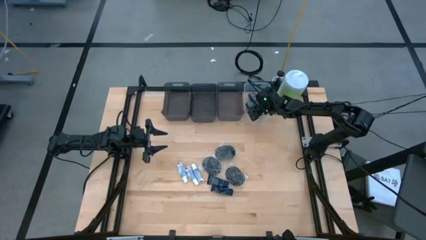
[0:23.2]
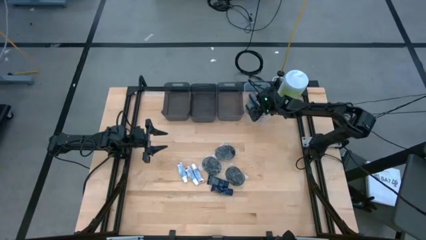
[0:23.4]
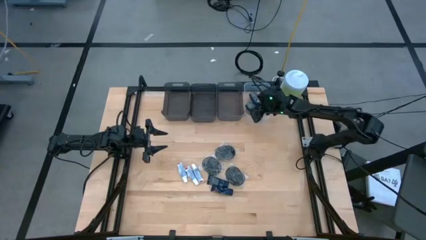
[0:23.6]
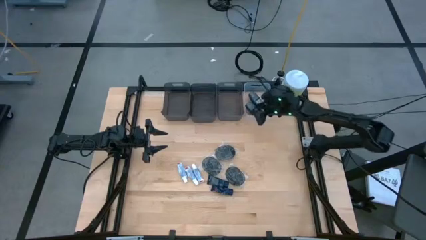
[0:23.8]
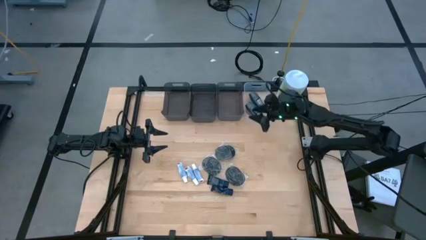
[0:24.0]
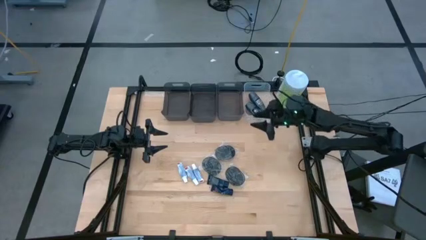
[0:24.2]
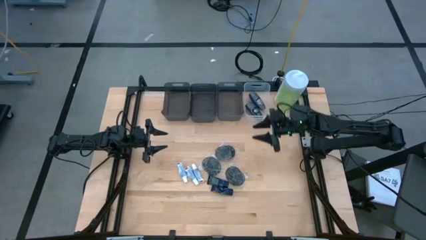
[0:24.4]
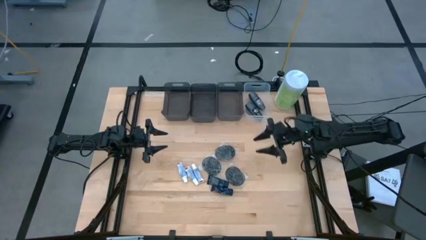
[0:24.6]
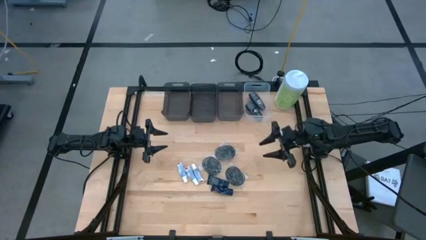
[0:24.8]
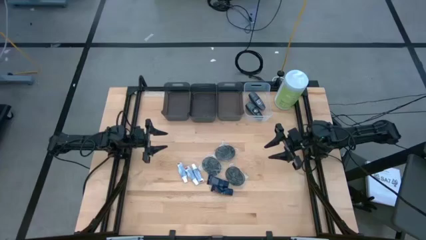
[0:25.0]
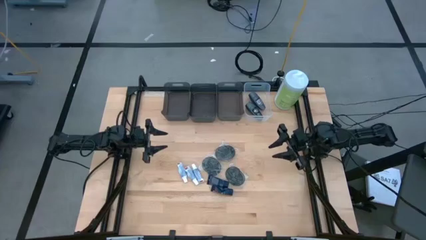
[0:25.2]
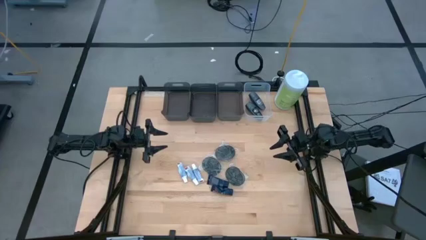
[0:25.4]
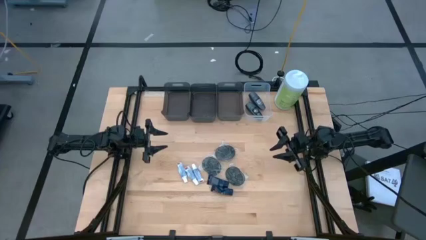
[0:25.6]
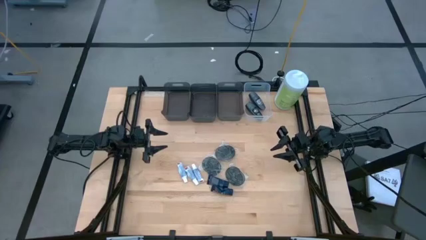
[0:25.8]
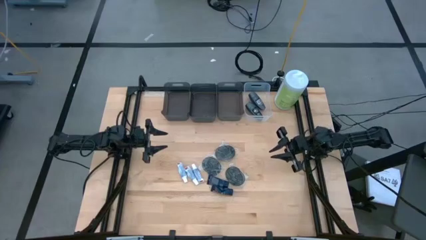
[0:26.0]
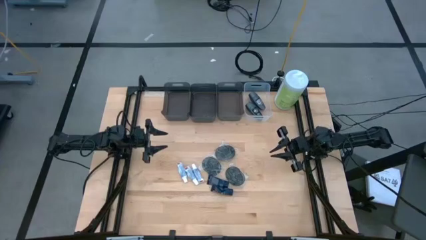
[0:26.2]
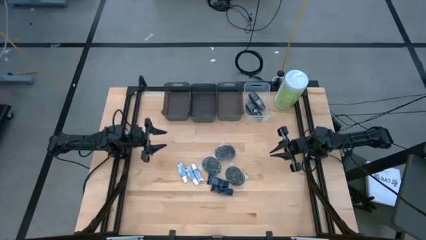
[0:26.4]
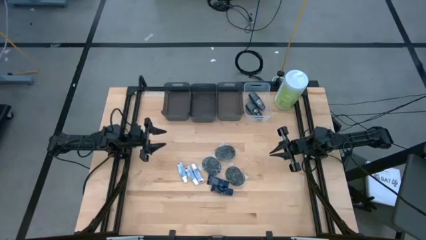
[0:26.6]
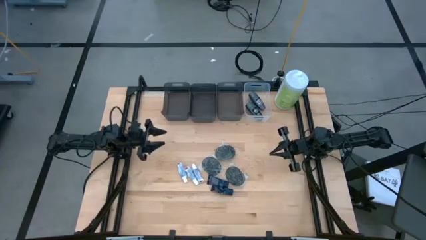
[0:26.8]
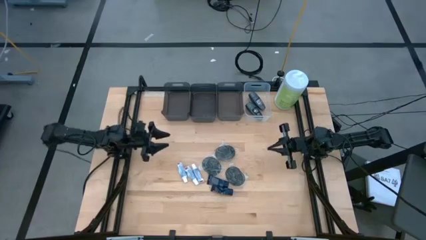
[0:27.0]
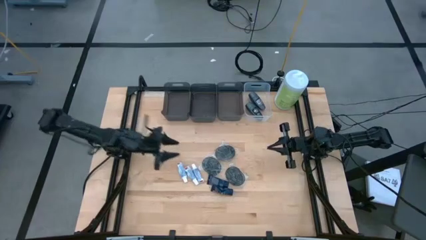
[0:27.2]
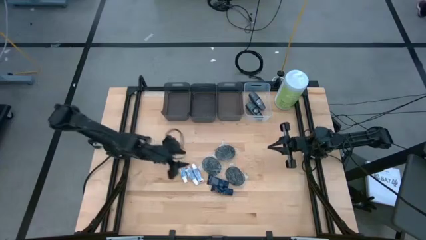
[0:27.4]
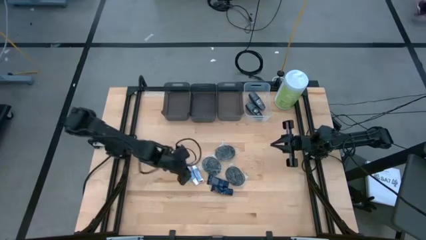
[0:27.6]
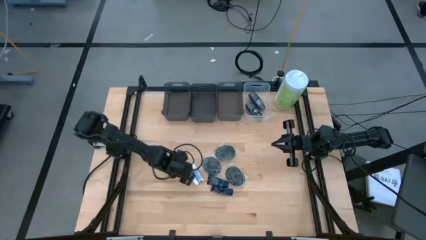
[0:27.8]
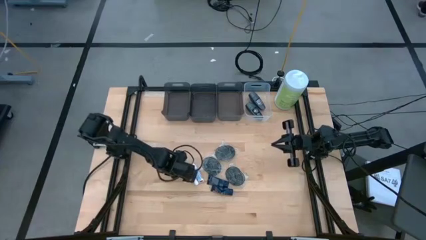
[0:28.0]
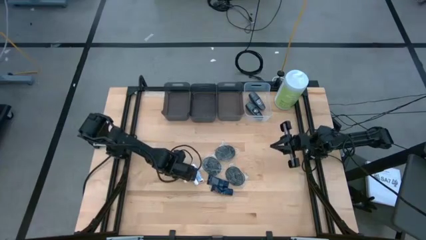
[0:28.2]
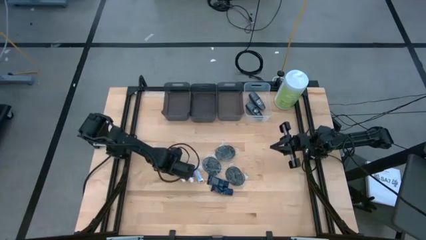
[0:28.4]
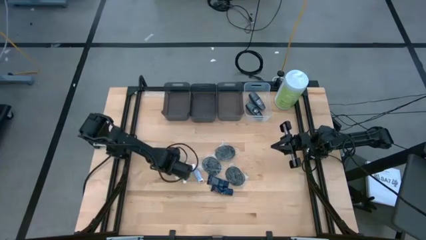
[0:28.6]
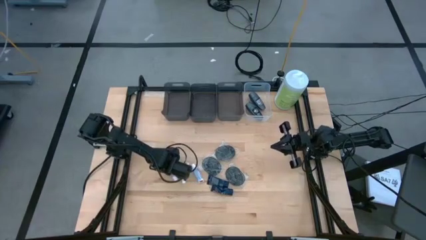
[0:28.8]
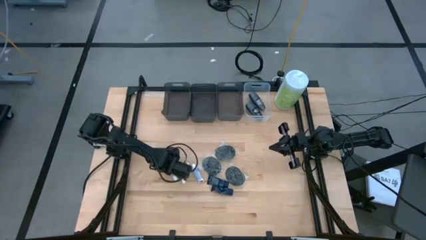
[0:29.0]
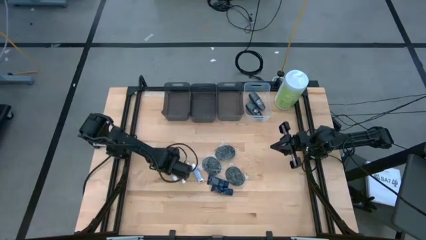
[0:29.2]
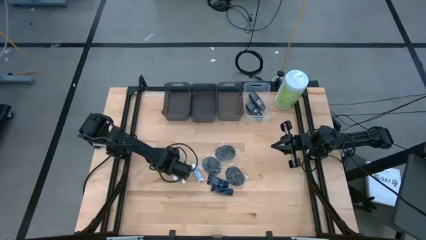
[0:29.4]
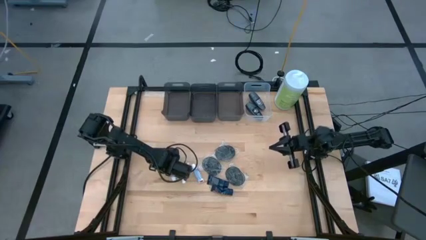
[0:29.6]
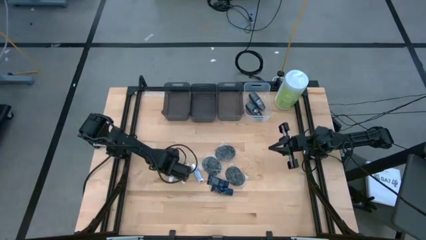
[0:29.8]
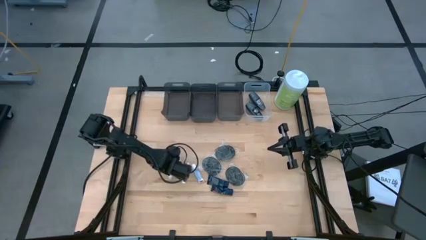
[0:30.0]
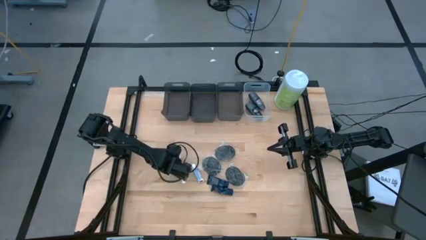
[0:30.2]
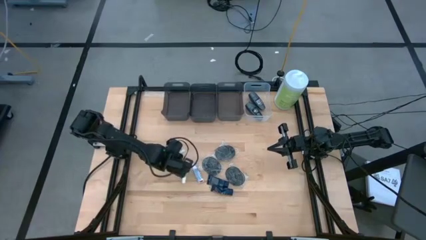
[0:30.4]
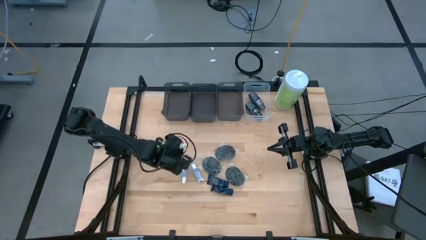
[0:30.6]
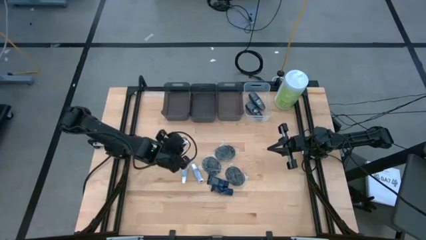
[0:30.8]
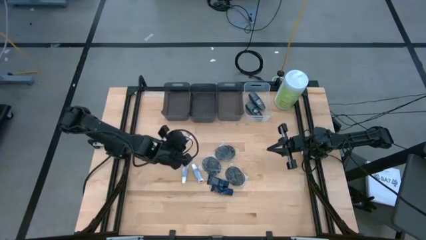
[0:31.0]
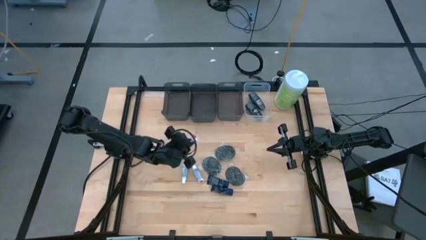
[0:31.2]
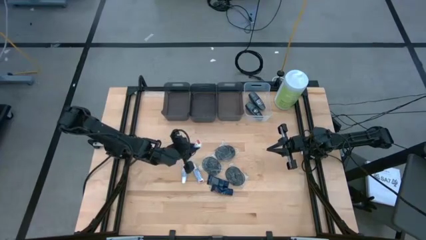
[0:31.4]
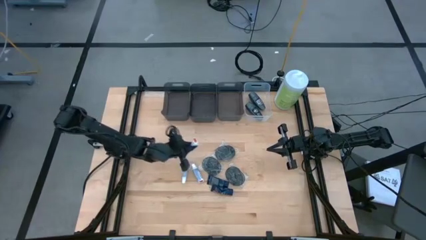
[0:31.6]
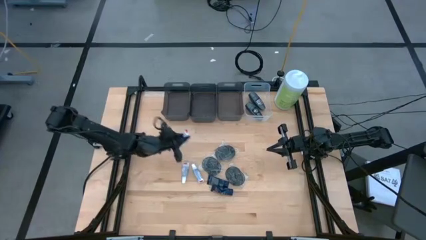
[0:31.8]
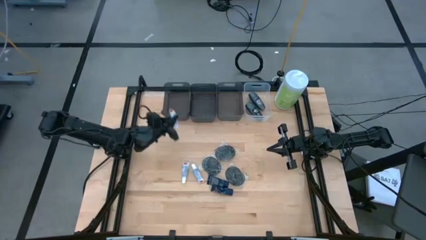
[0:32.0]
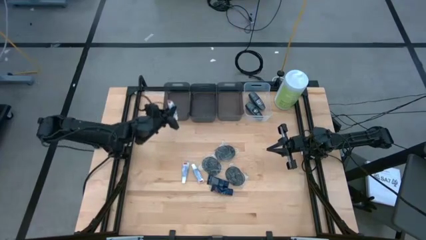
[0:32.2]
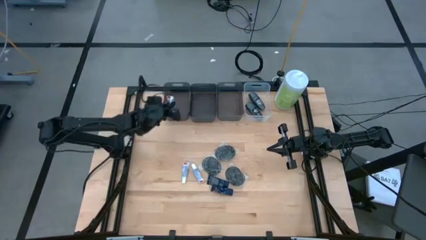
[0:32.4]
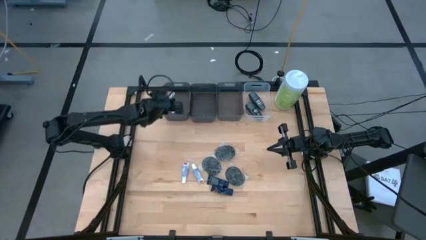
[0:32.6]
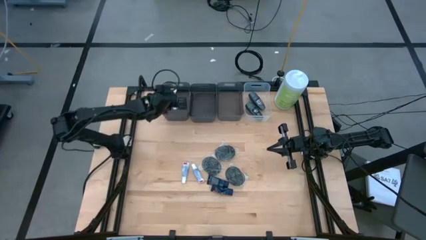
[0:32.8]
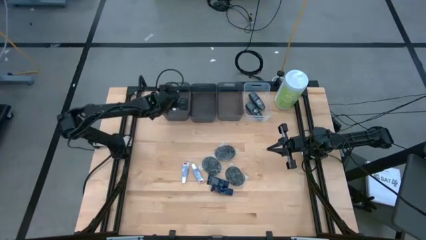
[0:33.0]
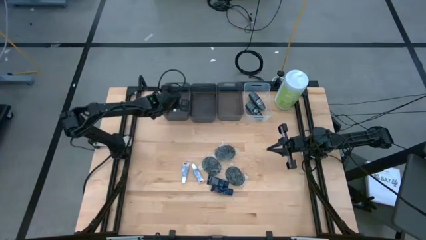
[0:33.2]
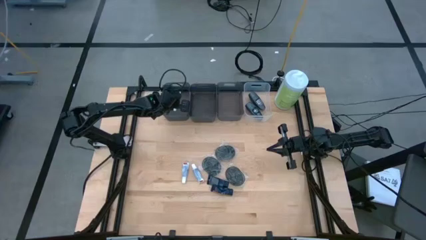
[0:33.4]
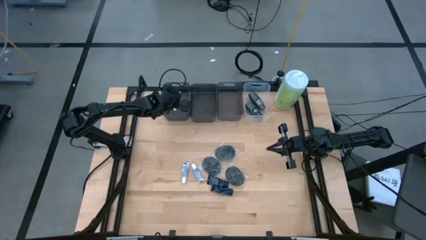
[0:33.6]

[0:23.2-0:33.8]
Task: Pick & Place Travel size toiletries
Put the left toothpaste into the left black bin

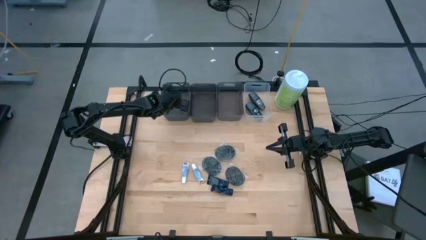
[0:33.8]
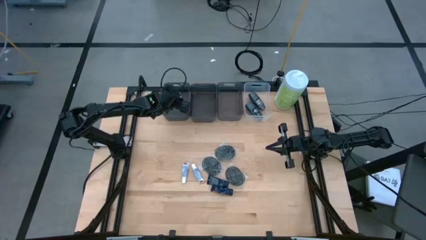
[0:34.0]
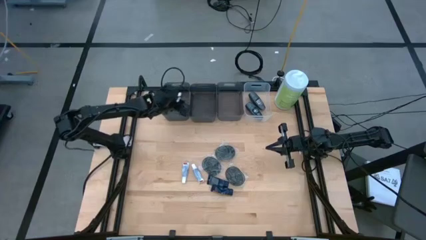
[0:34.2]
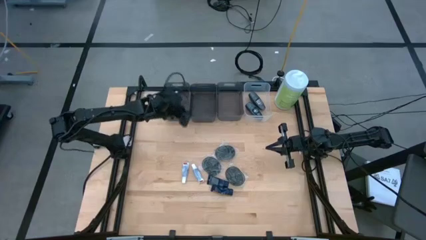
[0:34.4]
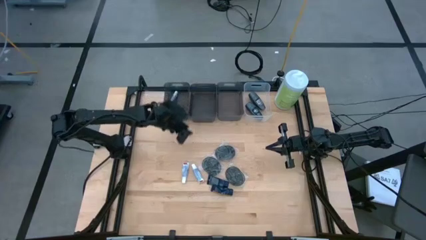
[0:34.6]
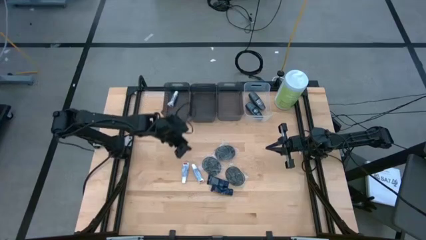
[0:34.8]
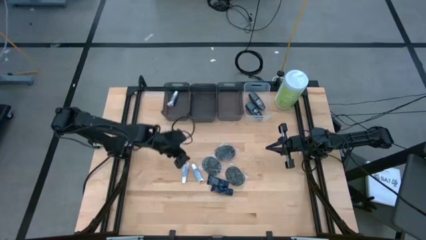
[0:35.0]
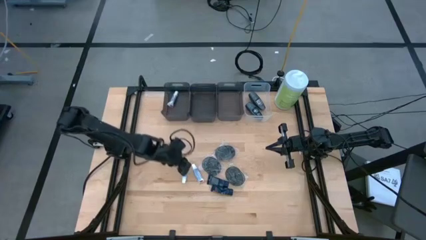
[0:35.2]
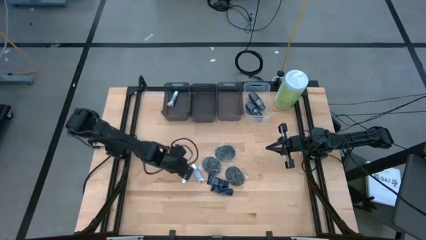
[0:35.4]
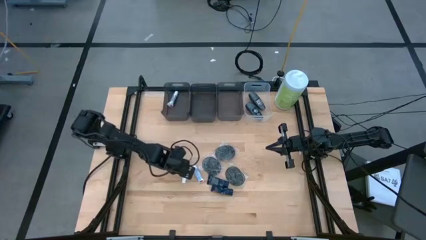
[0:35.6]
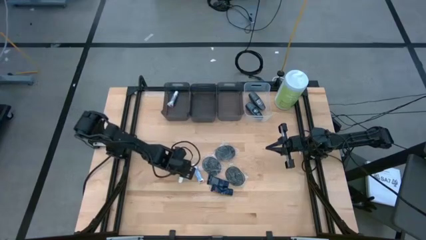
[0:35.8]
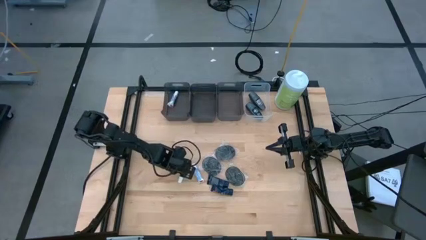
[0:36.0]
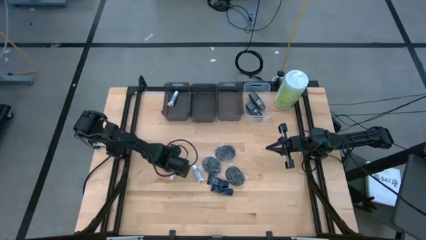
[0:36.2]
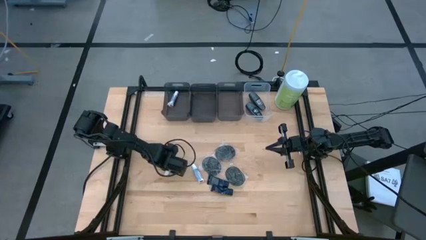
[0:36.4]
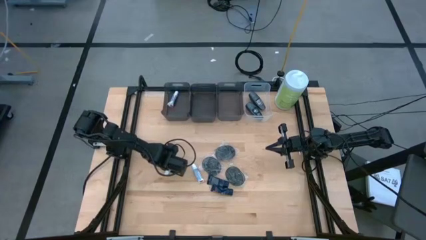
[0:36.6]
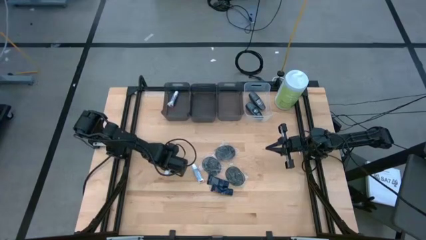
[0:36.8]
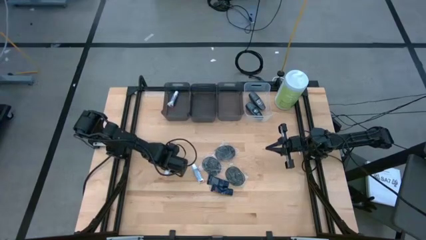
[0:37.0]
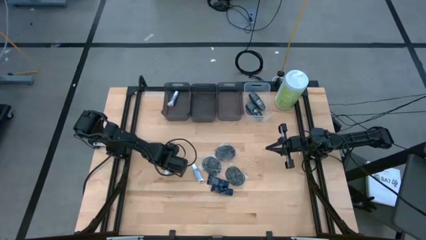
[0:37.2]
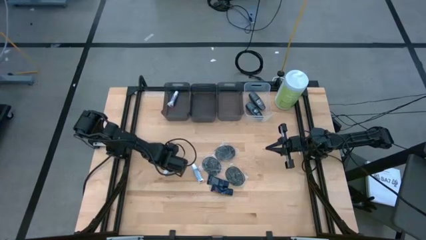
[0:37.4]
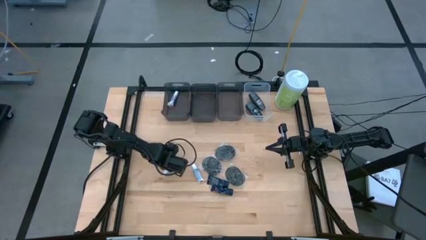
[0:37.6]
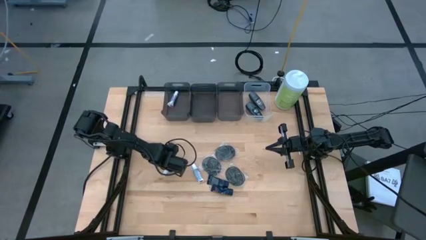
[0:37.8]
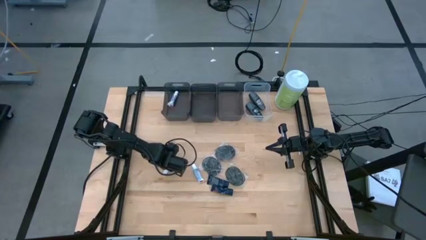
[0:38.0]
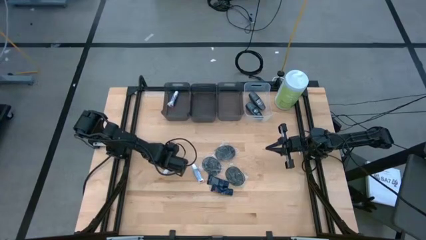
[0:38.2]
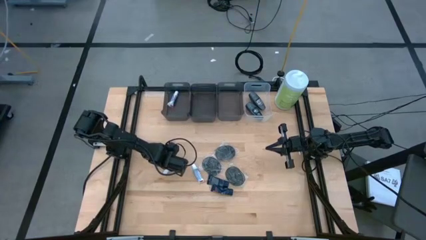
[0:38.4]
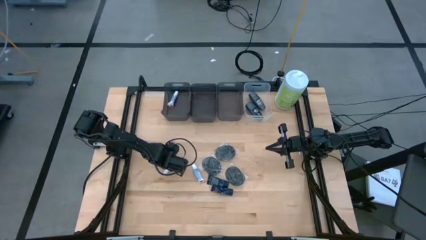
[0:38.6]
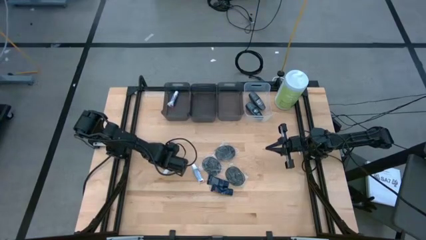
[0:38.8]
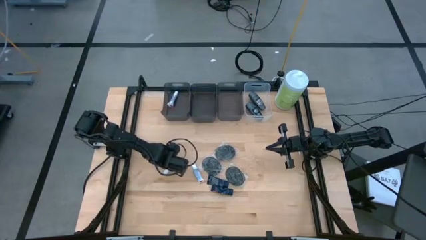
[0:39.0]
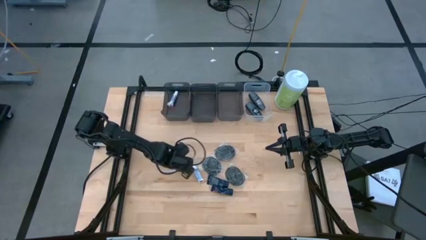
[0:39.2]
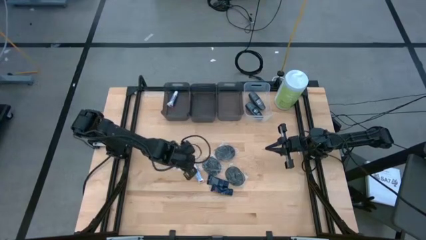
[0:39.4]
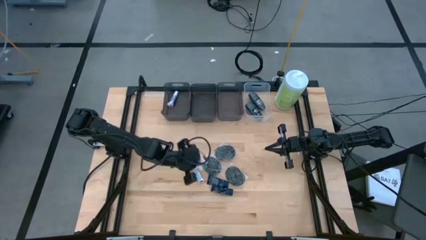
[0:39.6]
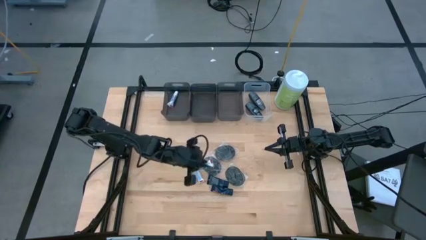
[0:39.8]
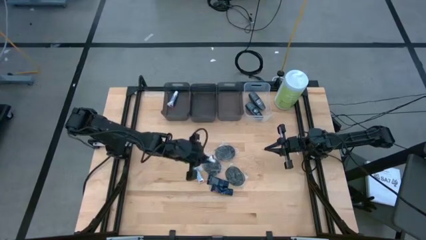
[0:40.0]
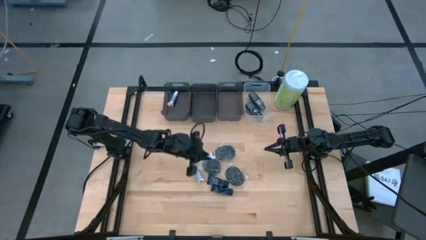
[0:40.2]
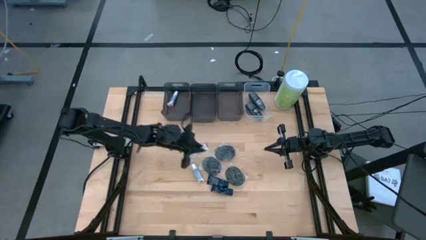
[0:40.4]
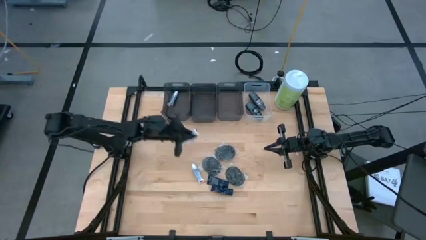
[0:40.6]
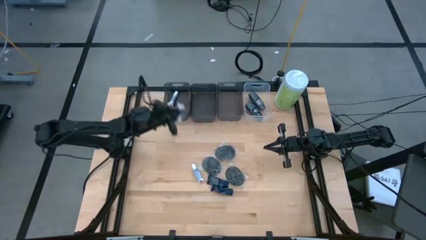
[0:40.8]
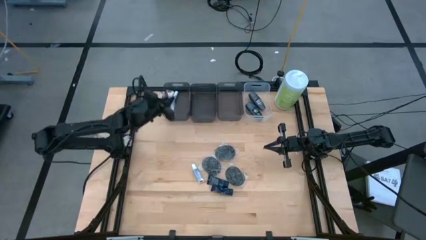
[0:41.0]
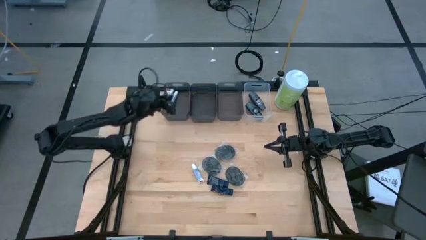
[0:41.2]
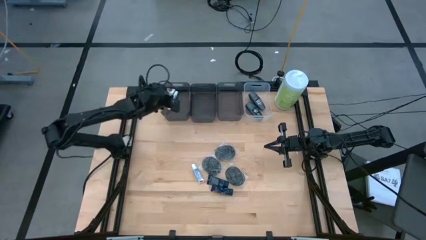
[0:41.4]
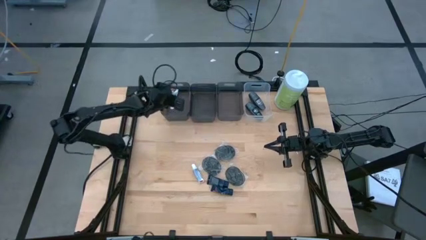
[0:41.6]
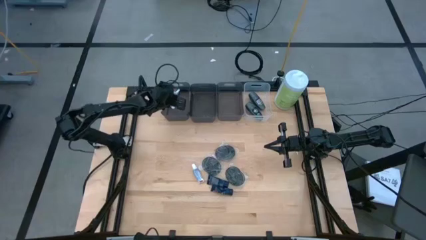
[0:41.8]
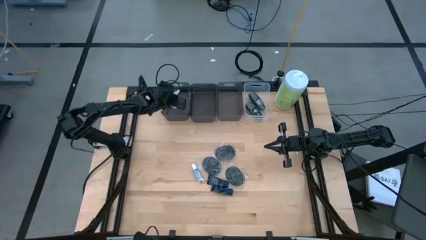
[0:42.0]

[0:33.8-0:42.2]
Put the left toothpaste into the left black bin
